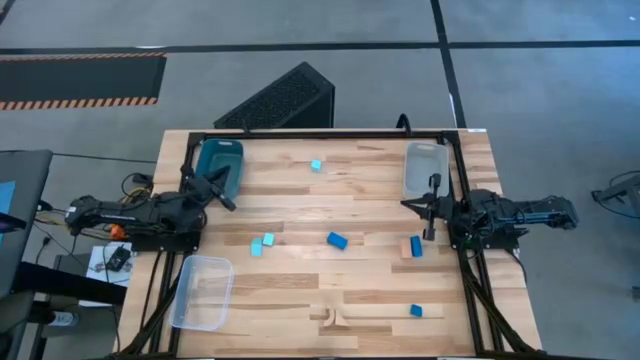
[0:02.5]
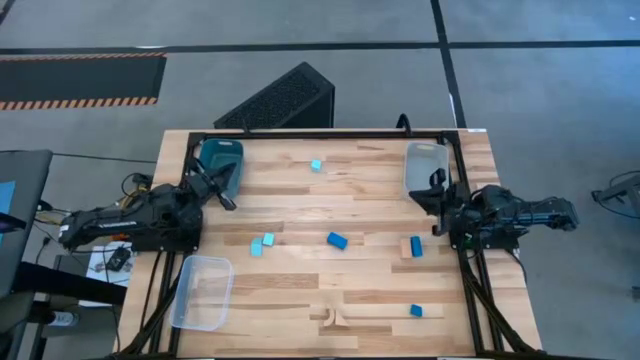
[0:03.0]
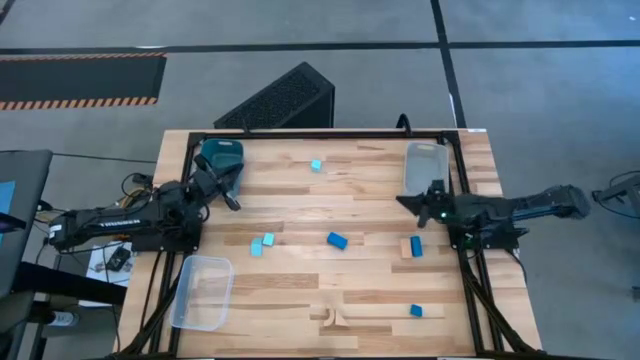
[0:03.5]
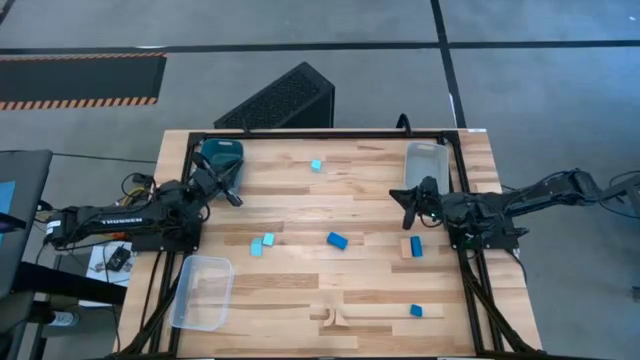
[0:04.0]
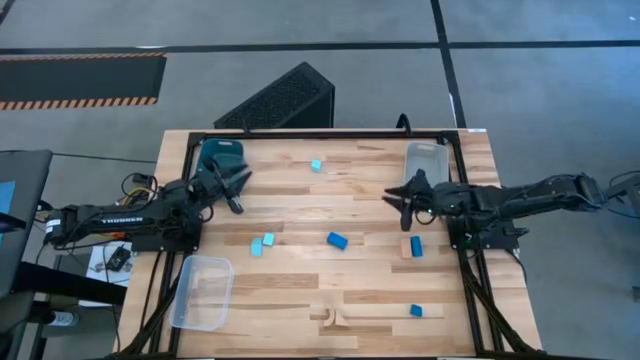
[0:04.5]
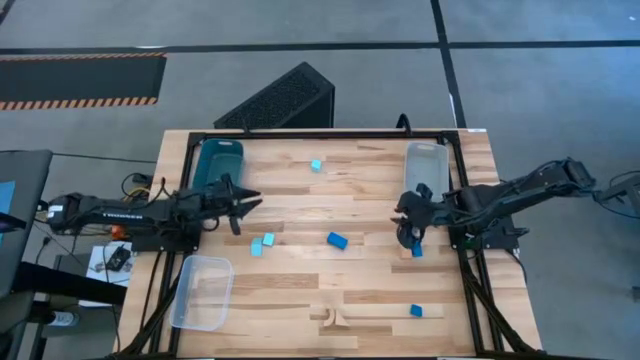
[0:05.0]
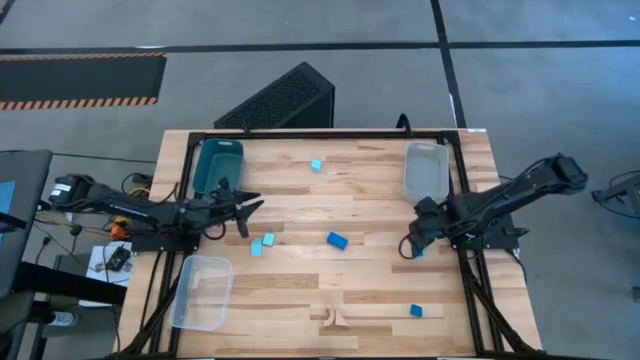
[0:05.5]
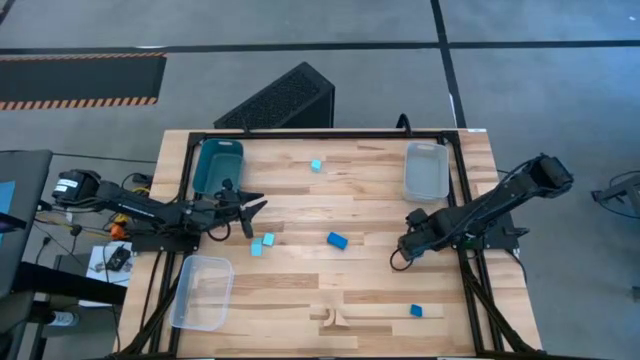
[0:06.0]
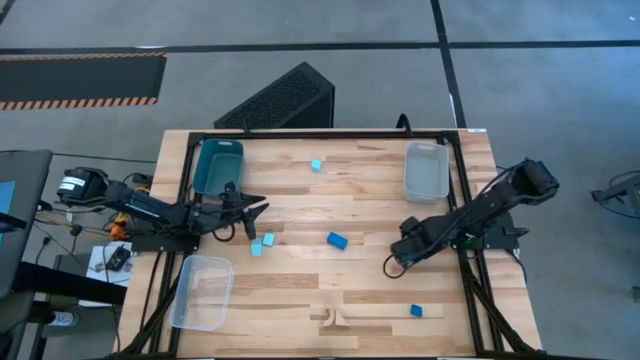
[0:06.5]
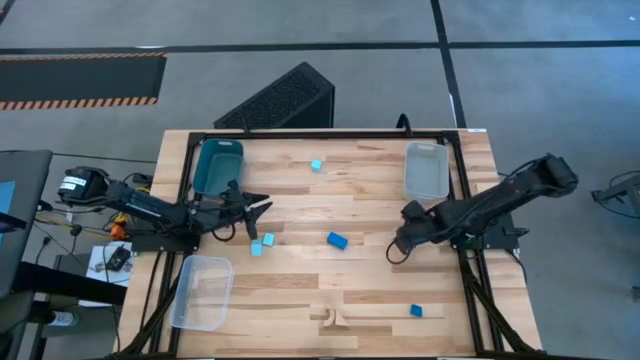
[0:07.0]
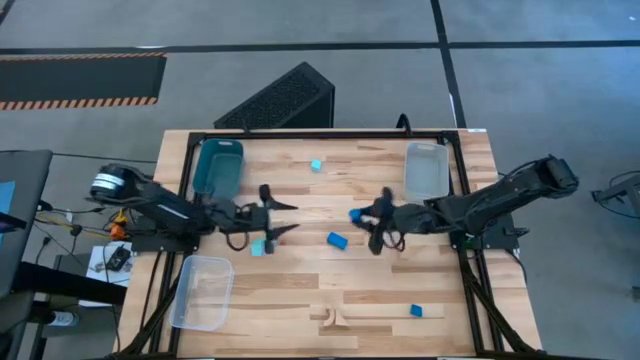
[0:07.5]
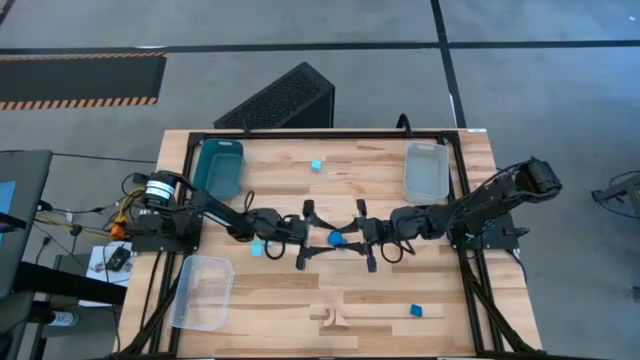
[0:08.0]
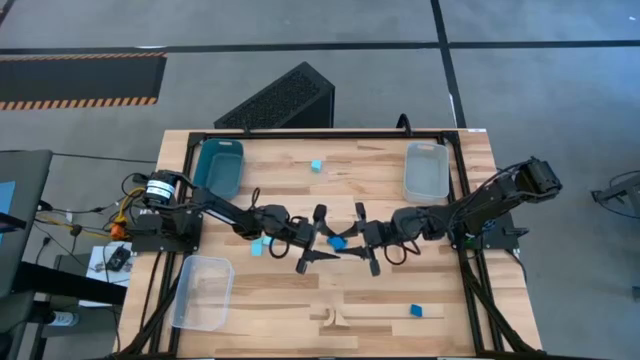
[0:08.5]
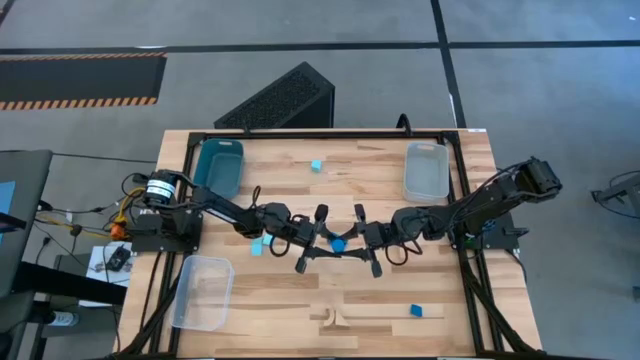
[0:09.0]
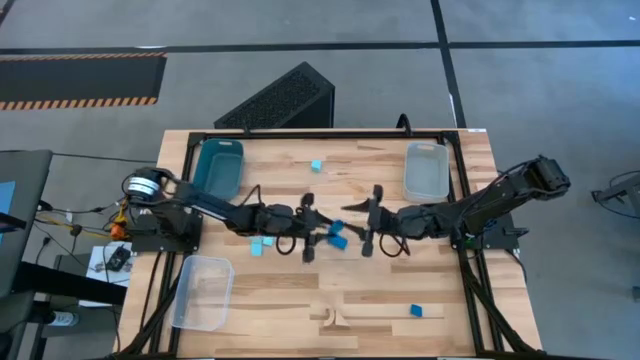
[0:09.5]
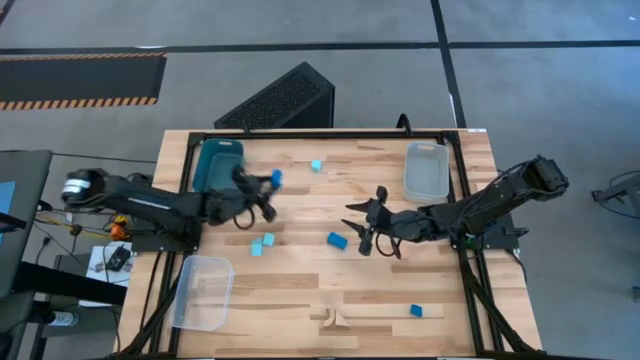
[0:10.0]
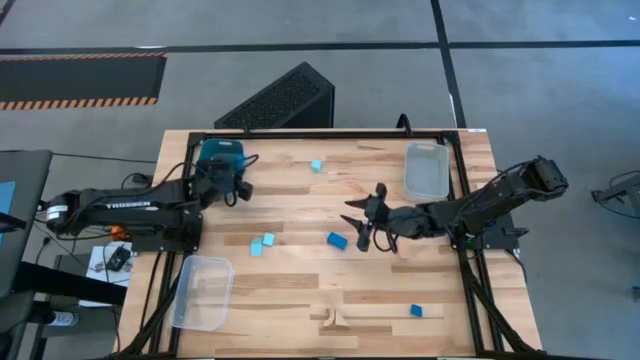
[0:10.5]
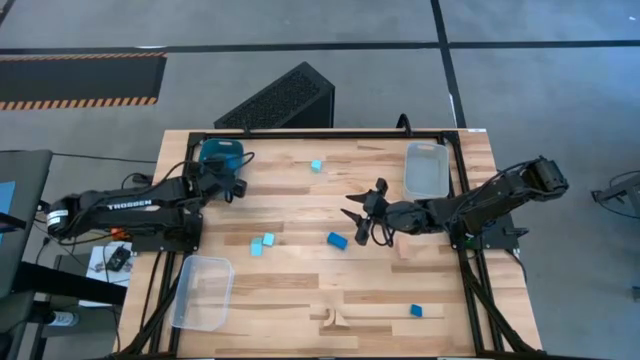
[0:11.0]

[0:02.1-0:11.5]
Task: Sort & place blocks by color
Put the top right blue block into the blue bin

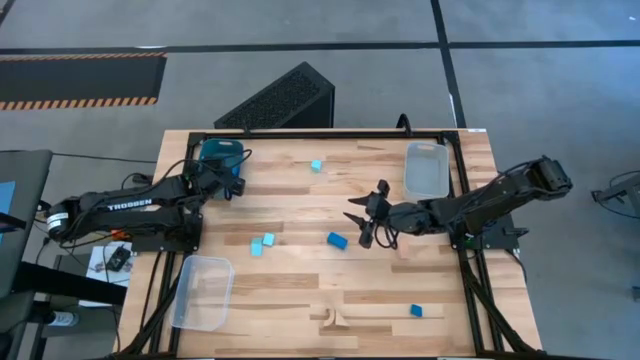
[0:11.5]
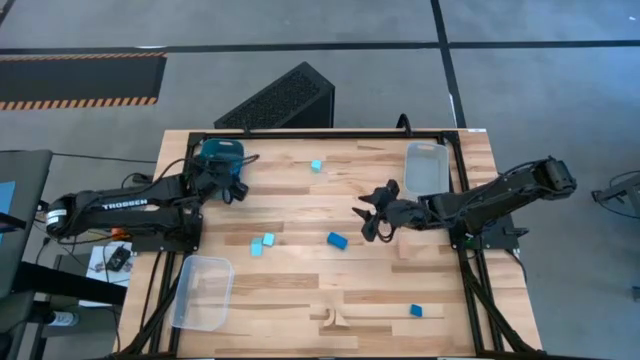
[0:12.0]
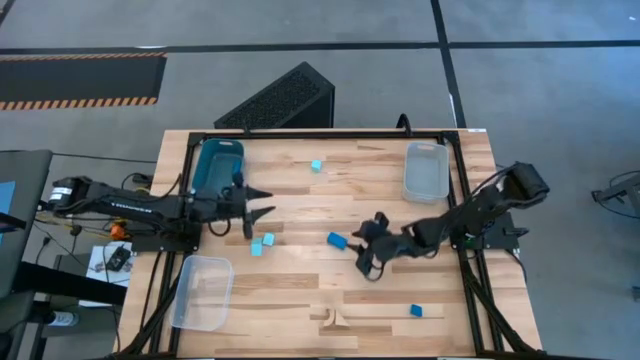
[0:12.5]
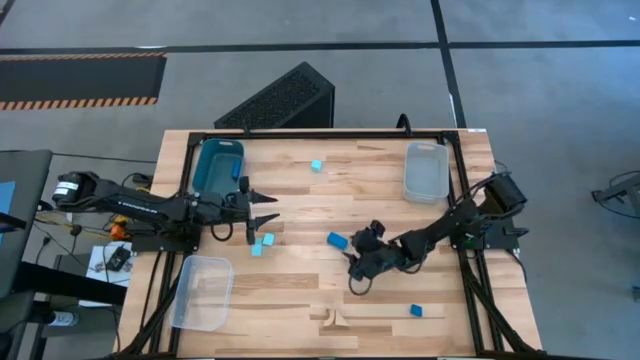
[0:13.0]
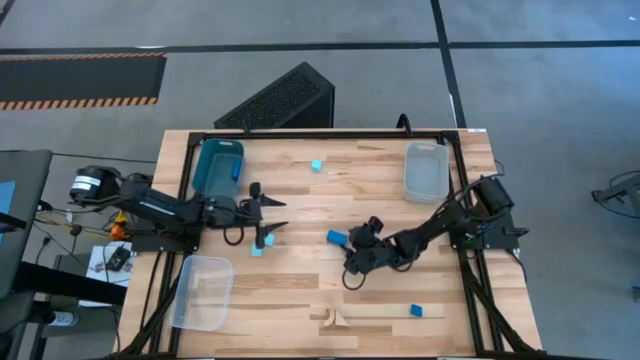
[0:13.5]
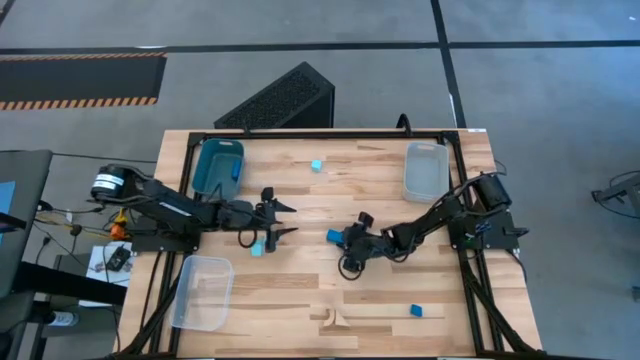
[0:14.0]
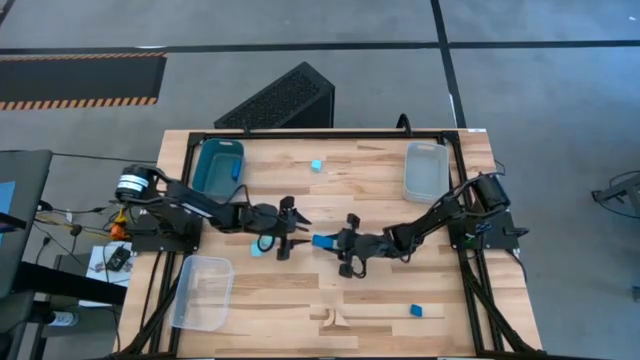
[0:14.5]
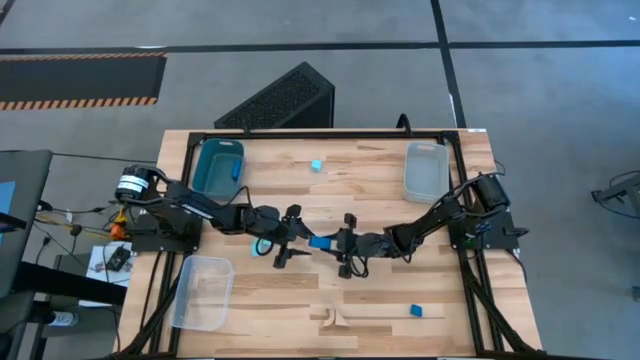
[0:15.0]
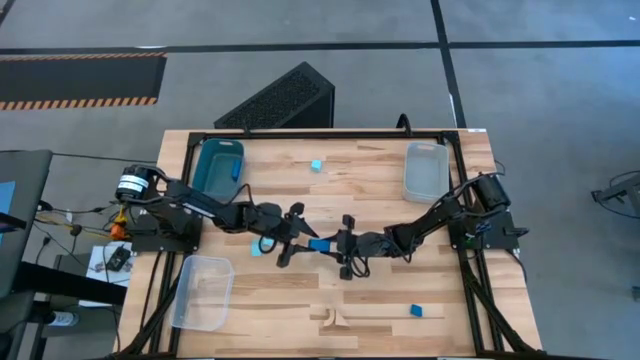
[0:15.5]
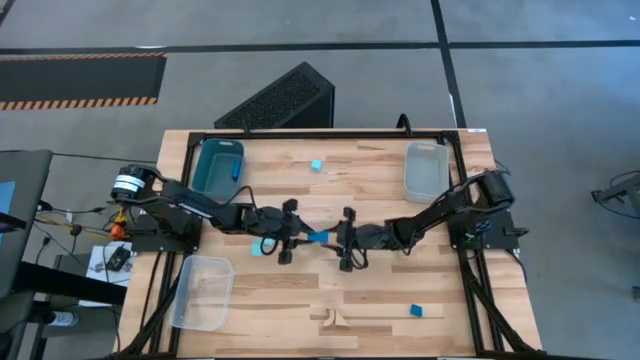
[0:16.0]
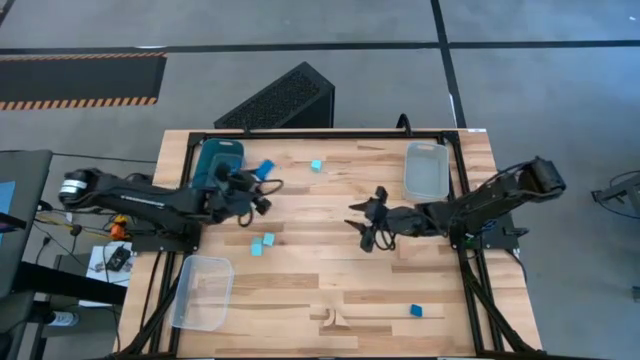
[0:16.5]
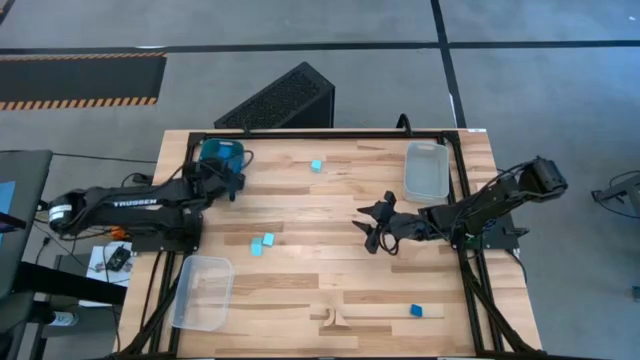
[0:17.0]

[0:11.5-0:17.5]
Put the top blue block into the blue bin

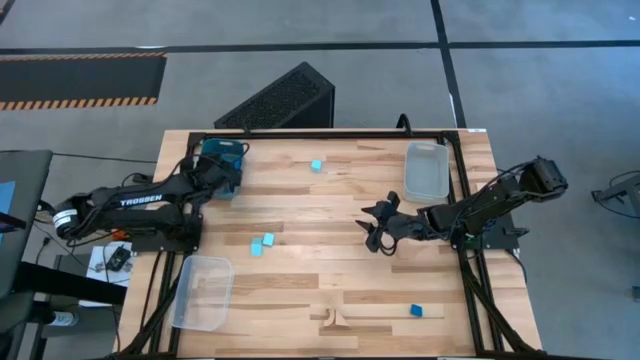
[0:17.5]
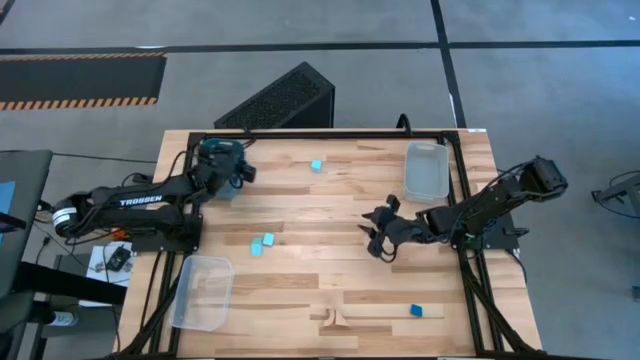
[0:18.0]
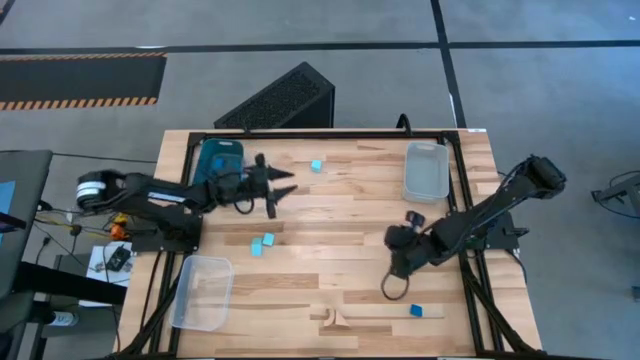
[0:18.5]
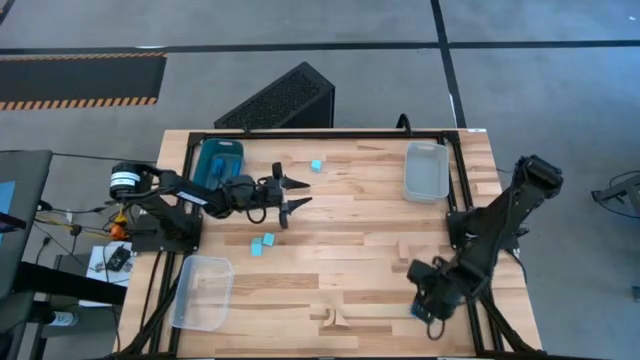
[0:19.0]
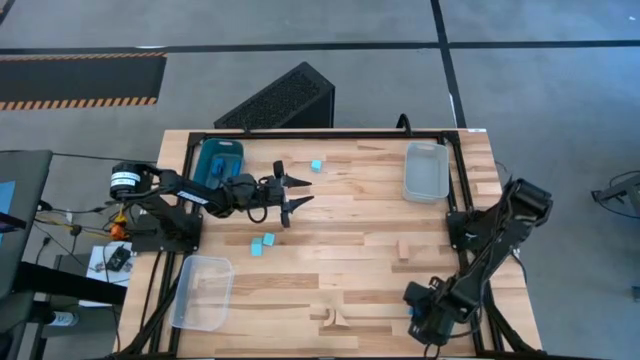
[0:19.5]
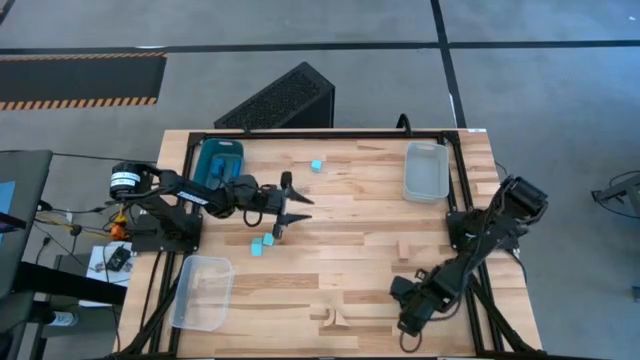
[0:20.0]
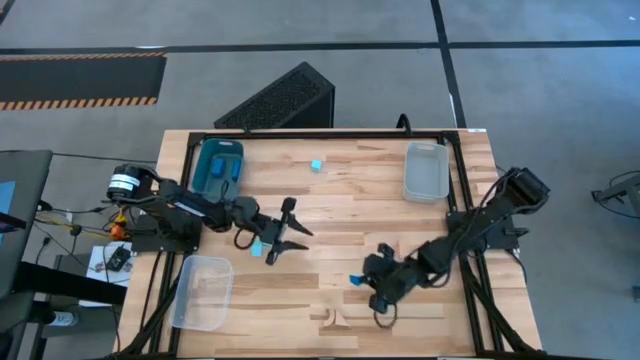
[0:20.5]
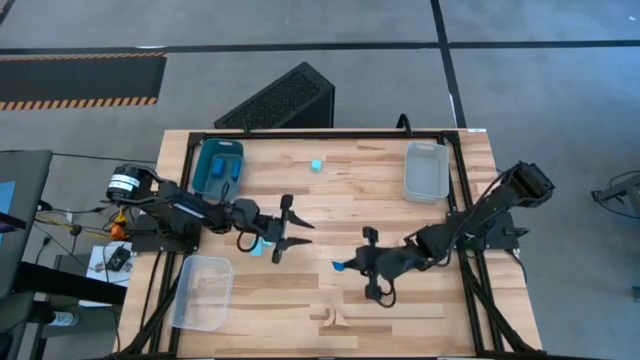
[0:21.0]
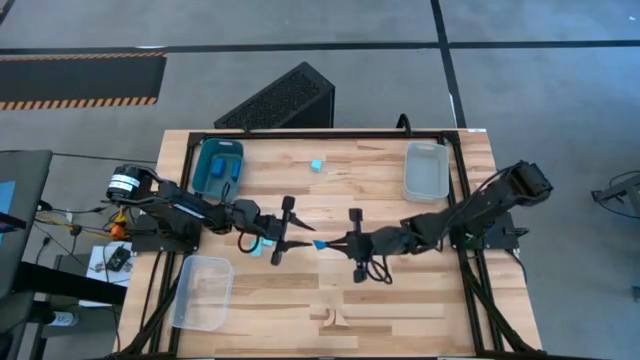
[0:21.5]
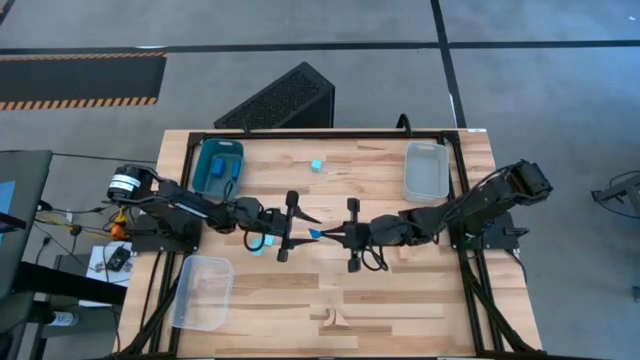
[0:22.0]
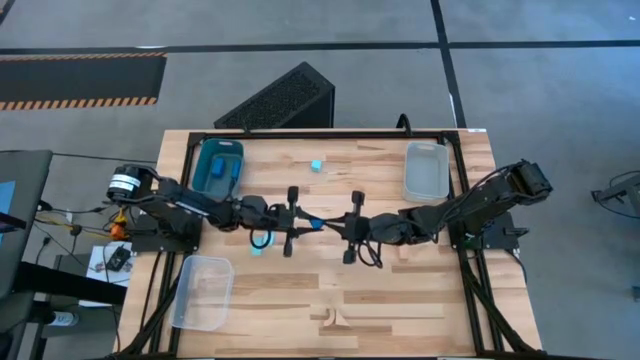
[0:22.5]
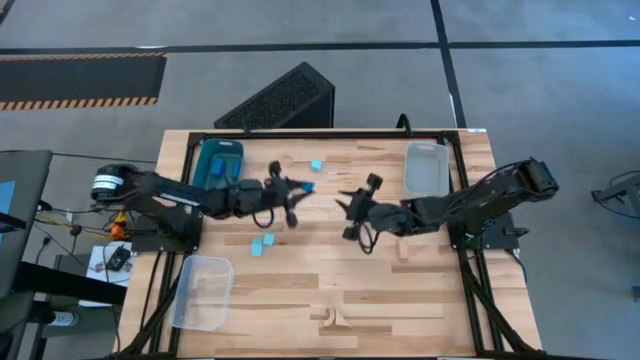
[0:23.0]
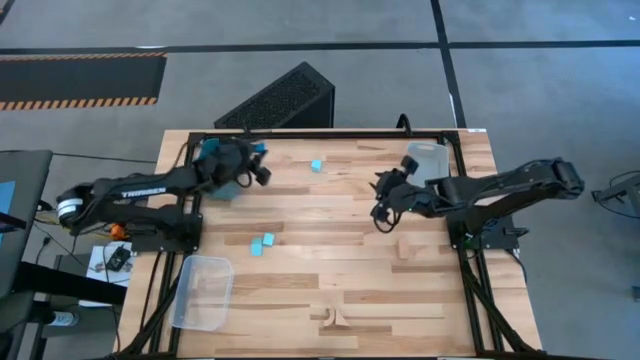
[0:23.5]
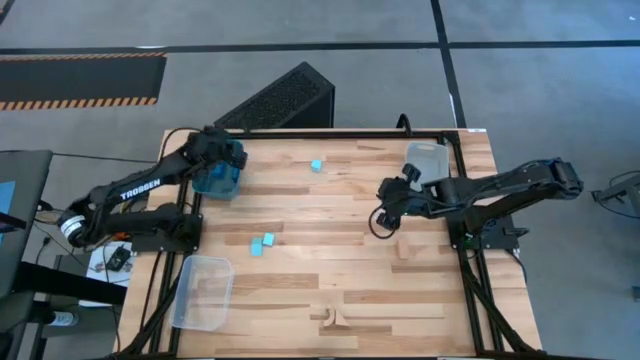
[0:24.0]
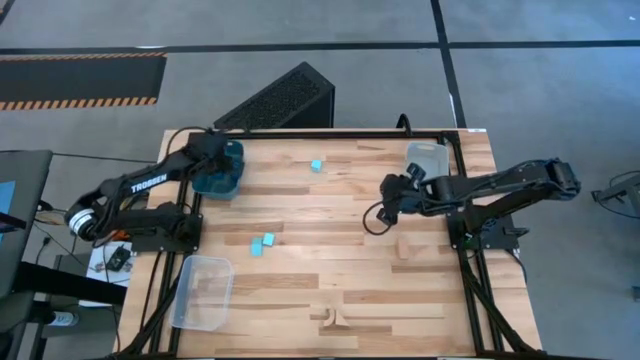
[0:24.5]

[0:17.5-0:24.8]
Put the blue block into the blue bin
